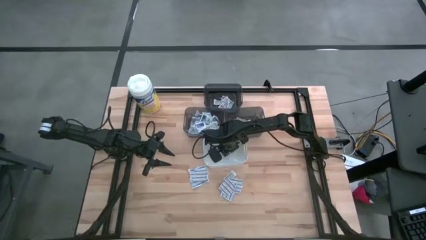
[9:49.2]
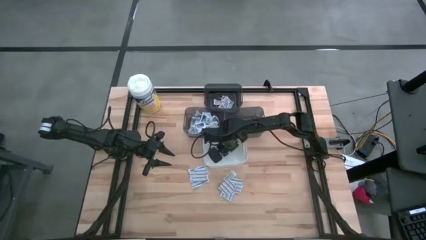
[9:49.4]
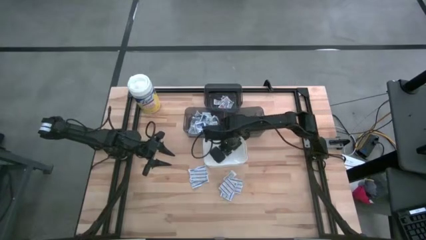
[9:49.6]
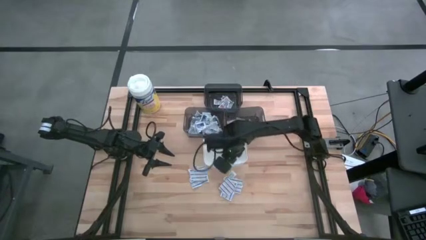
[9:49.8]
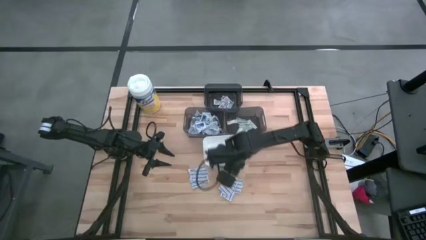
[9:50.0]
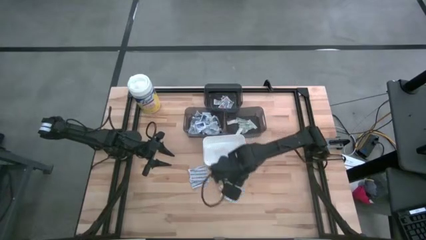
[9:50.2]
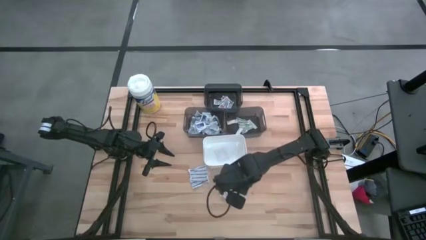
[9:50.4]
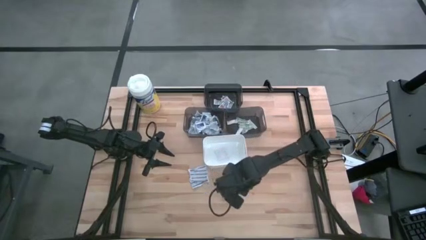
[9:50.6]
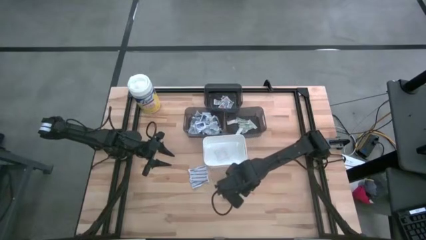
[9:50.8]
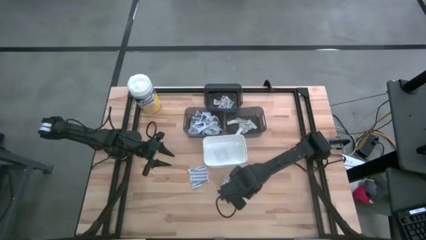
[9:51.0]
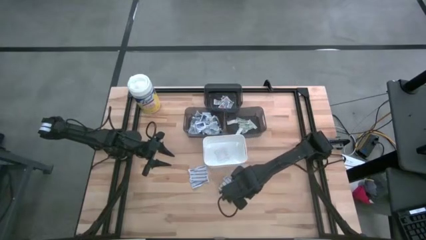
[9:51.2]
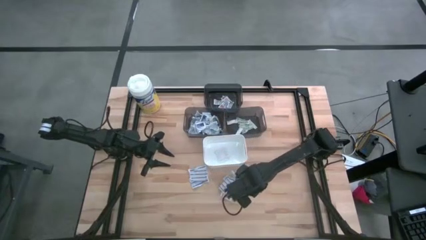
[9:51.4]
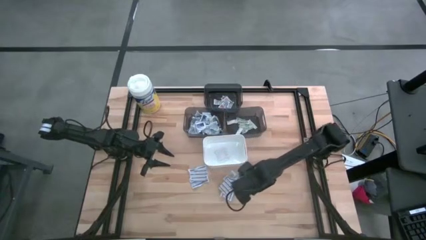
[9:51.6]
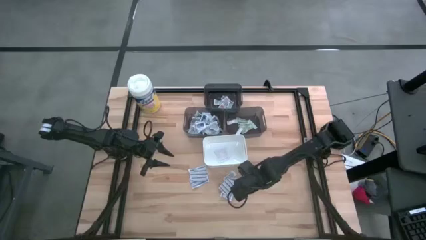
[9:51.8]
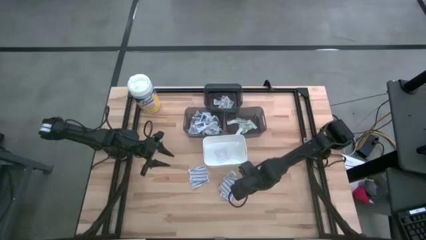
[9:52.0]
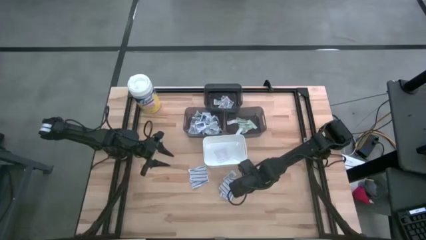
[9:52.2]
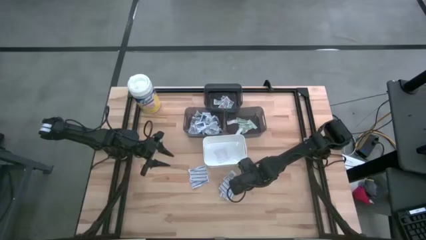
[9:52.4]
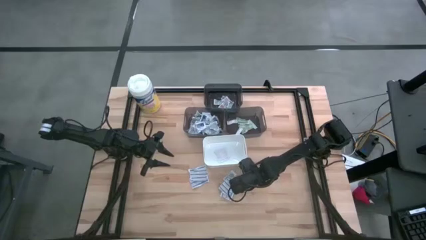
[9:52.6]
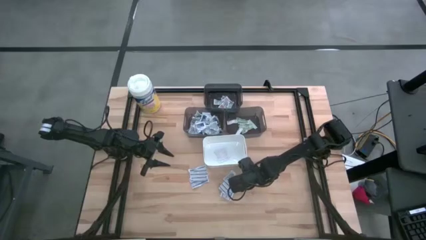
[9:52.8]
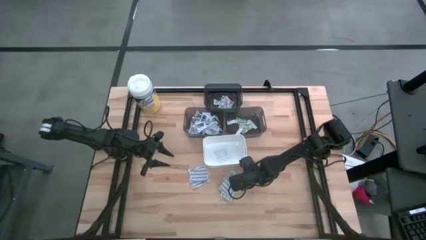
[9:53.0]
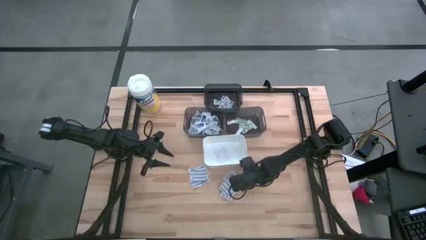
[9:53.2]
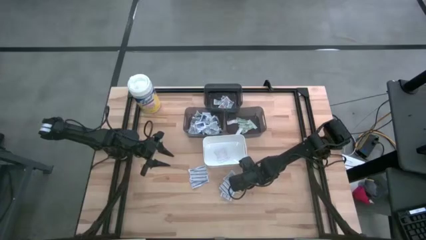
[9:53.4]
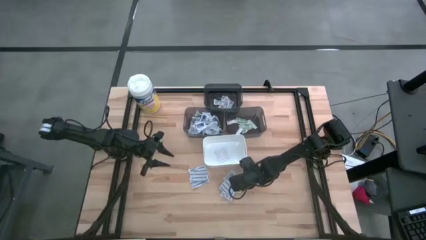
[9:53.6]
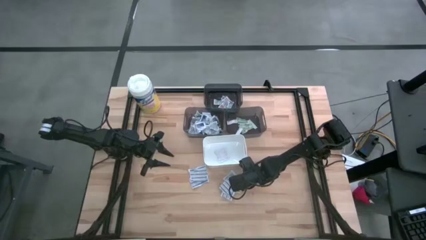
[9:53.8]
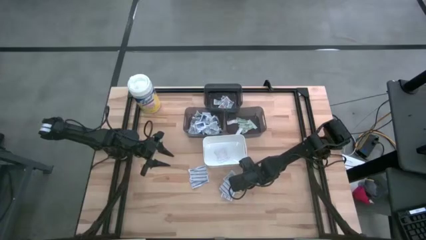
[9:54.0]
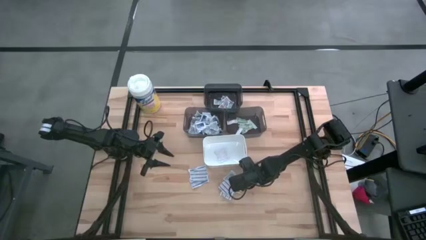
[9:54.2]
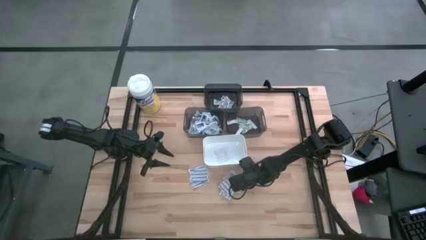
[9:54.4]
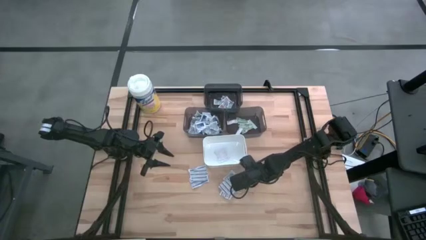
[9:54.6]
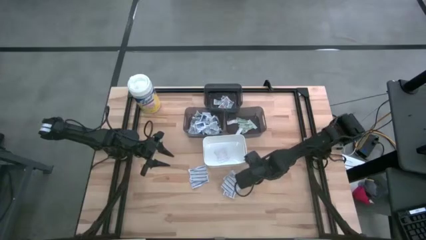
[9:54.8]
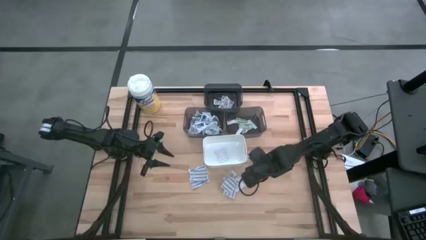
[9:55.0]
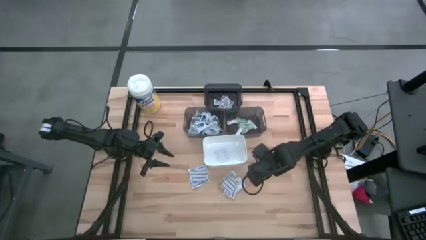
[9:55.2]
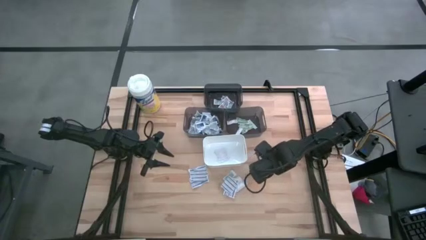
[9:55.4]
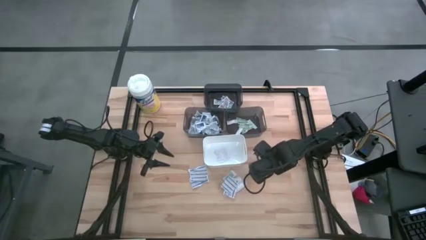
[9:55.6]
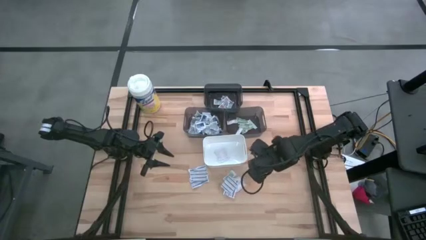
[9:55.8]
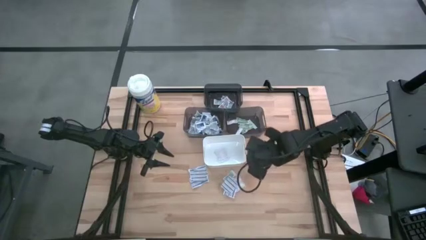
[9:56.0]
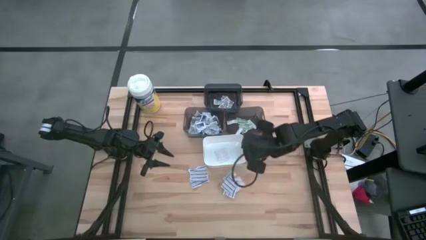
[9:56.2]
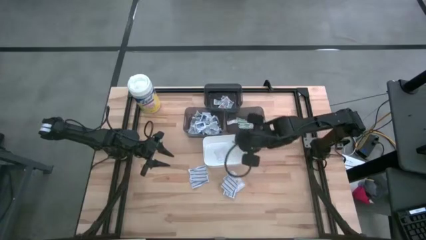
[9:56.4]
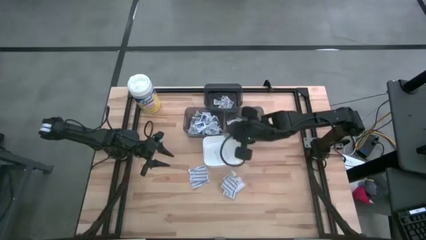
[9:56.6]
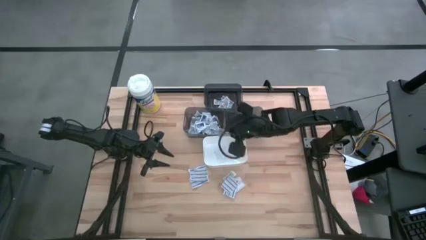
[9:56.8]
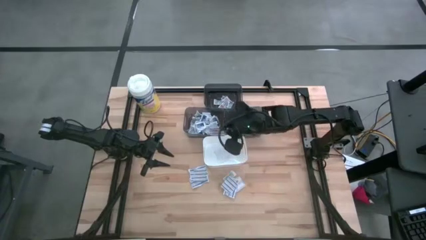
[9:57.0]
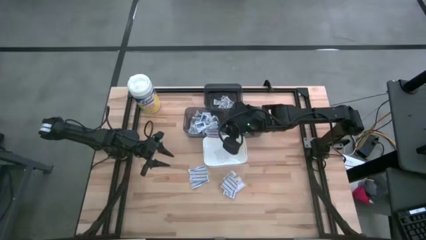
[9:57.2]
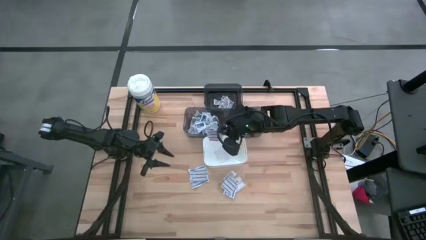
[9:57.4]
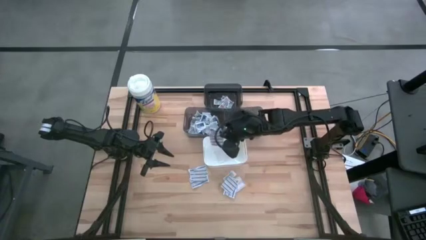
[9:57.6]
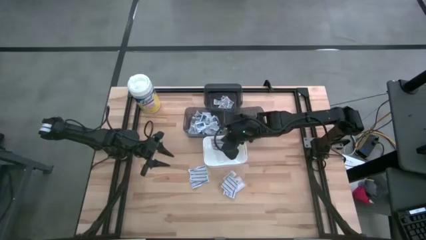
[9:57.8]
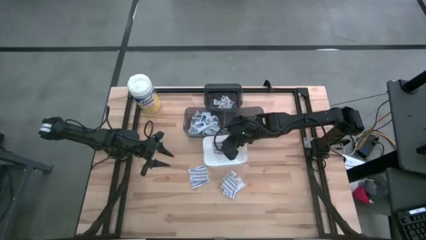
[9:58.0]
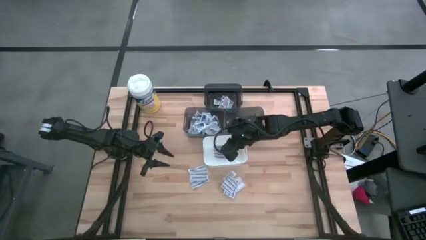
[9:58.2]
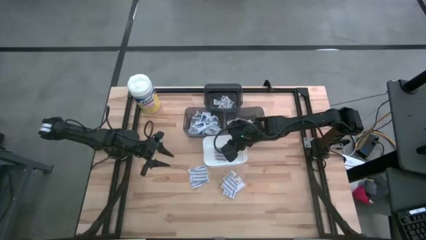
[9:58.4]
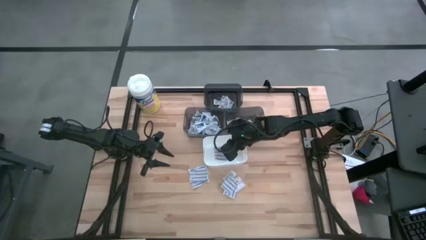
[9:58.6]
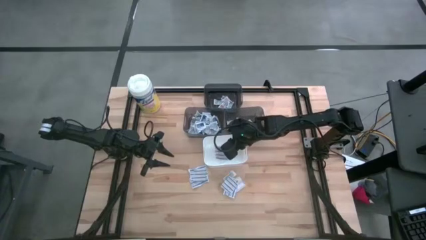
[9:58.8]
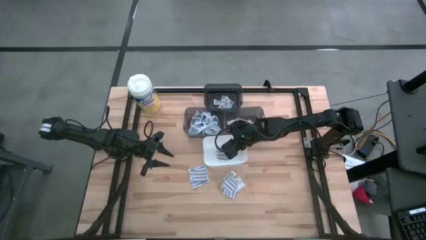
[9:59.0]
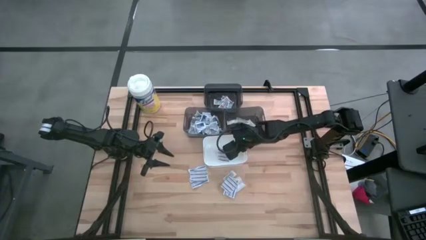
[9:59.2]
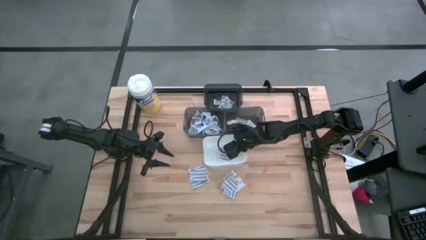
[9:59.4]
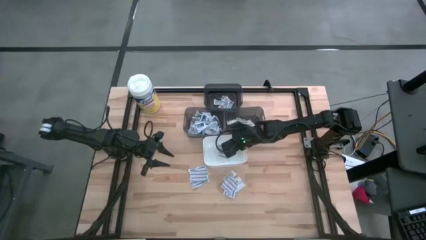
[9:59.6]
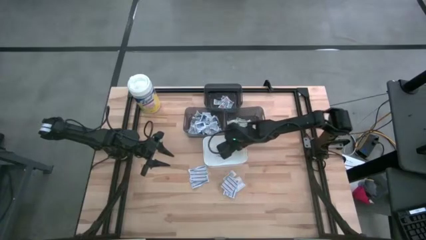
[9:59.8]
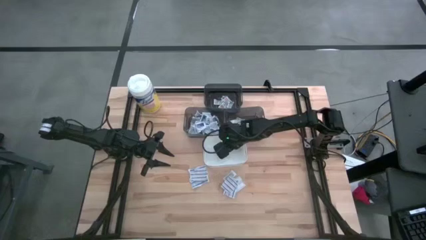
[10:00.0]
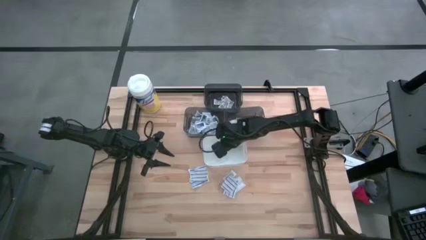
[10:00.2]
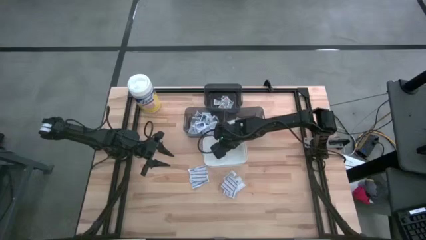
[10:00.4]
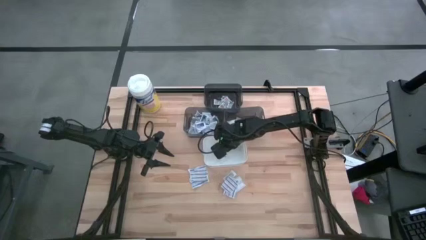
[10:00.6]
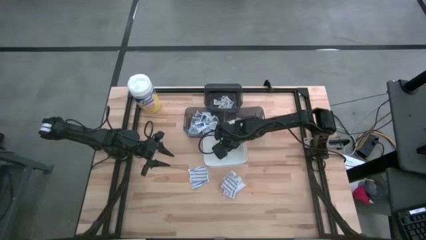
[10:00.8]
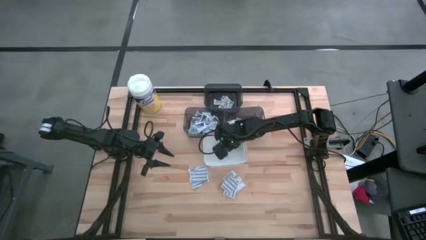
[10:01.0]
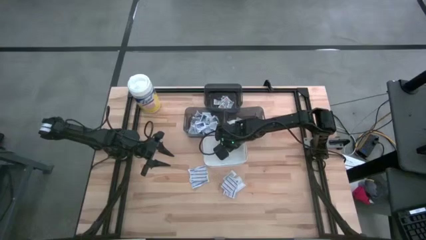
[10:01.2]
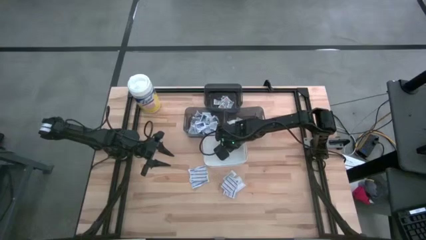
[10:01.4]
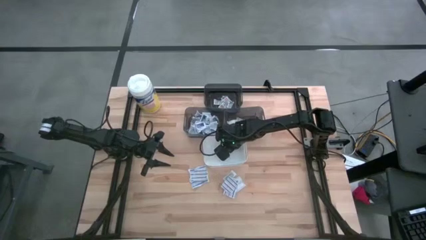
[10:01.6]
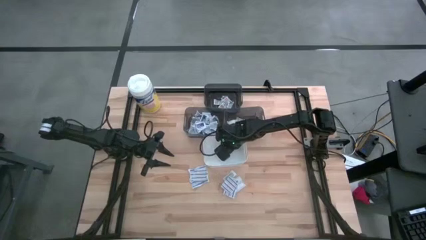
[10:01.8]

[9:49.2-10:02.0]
Task: Pick & Place First Aid Supplies
Put the blue bandage into the white bin

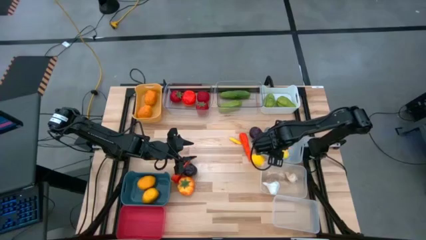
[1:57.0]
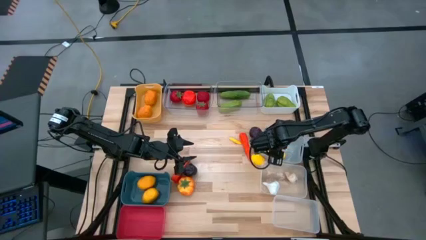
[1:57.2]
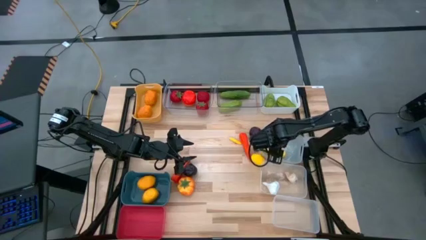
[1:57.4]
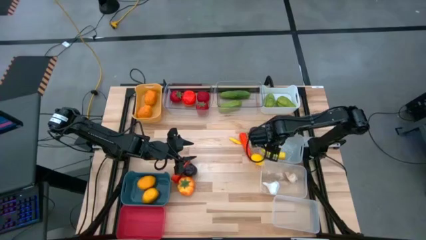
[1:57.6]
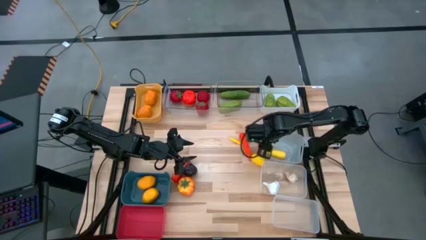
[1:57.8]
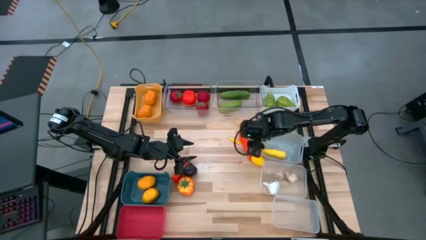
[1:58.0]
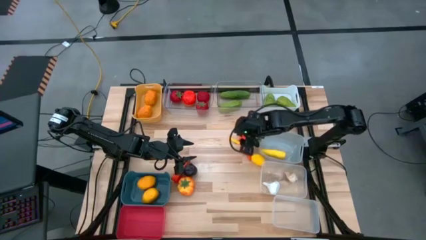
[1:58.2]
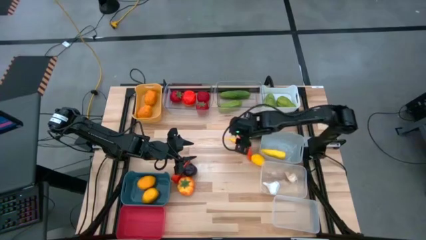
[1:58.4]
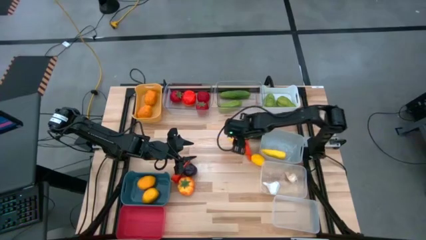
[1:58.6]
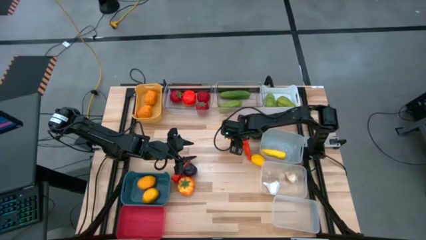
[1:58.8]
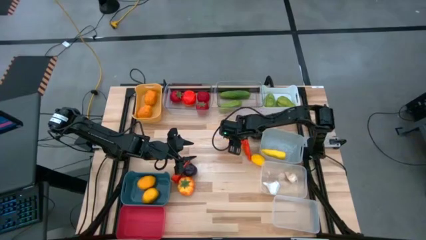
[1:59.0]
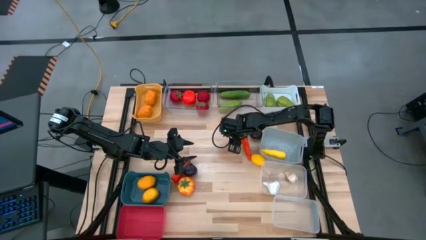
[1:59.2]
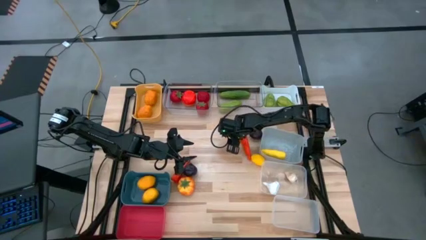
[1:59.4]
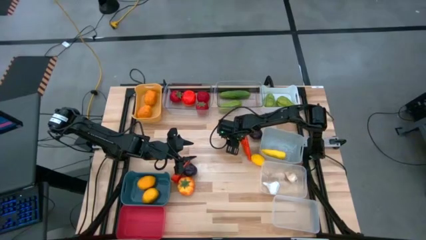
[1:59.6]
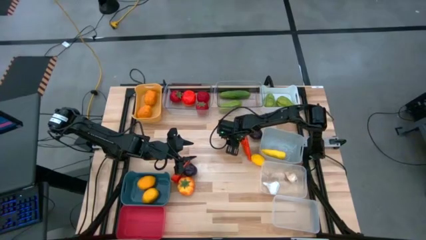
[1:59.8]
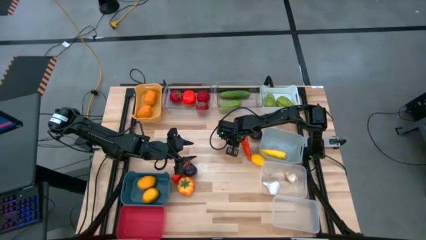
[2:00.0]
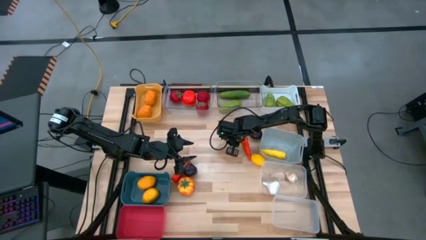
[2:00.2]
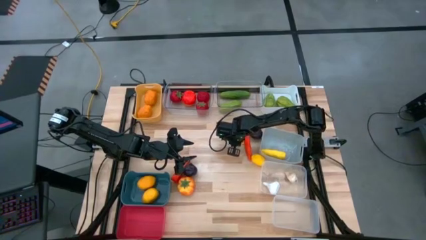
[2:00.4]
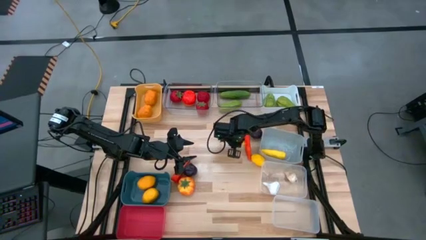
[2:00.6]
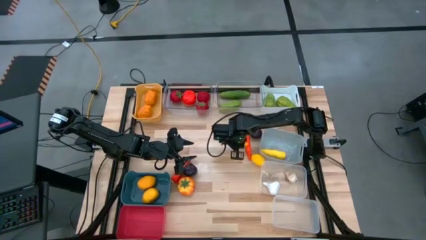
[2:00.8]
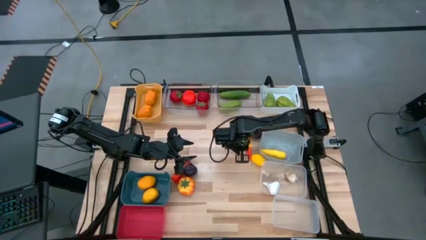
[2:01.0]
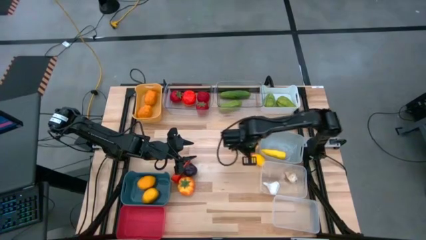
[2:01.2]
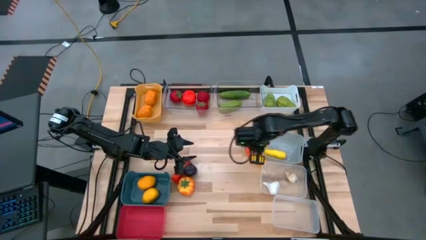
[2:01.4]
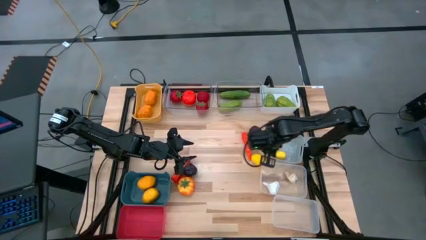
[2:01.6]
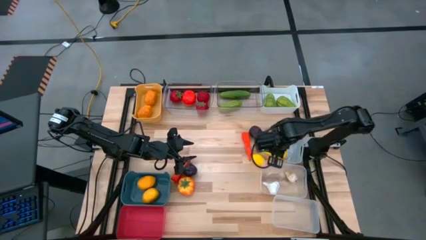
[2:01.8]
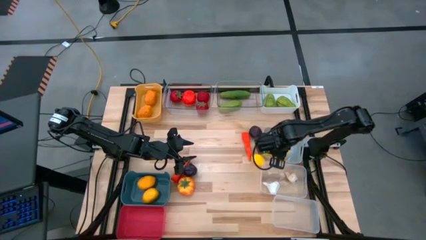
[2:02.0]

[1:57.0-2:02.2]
Task: Sort produce into baskets
Put the yellow corn into the gray bin
